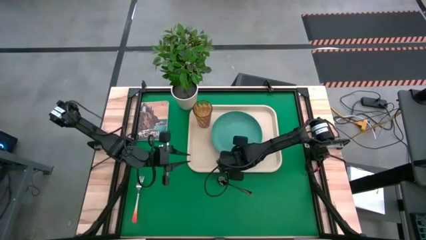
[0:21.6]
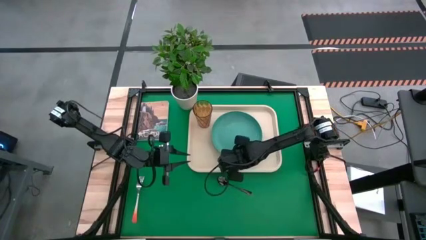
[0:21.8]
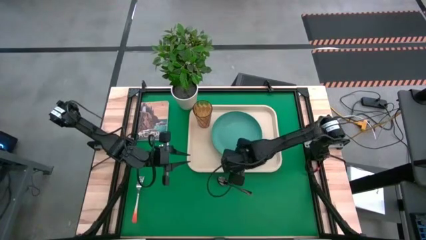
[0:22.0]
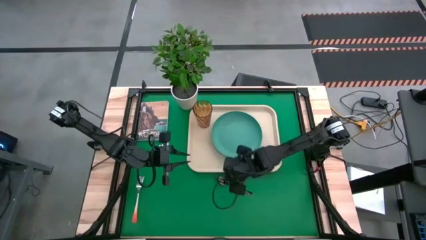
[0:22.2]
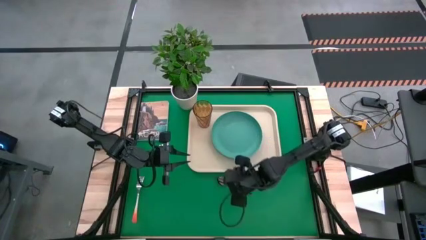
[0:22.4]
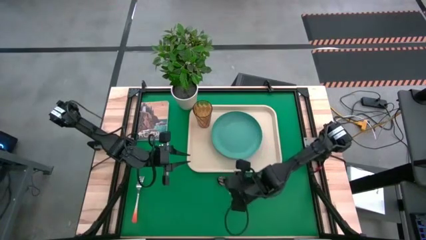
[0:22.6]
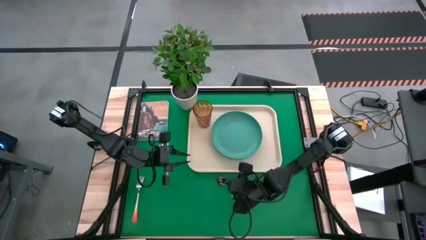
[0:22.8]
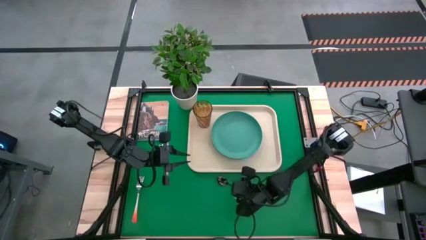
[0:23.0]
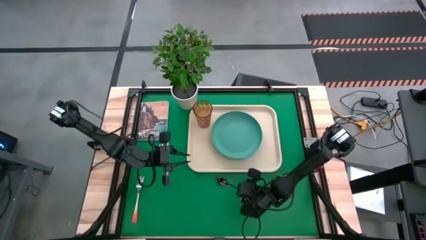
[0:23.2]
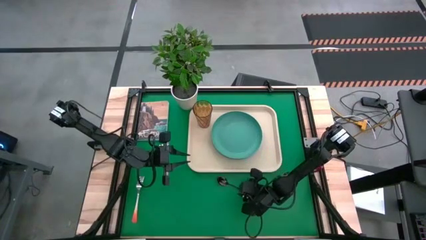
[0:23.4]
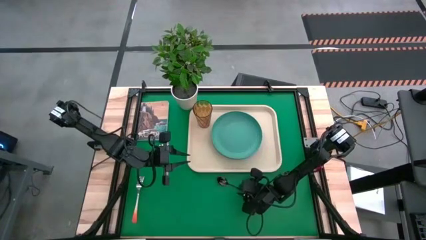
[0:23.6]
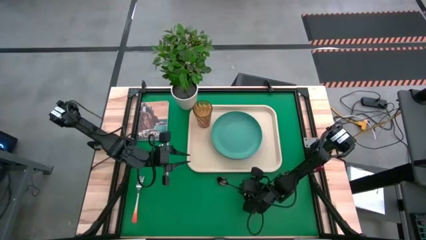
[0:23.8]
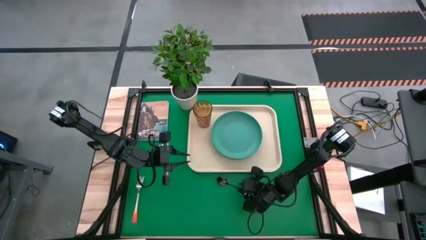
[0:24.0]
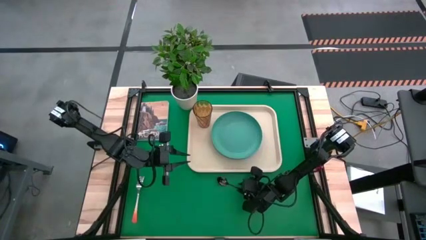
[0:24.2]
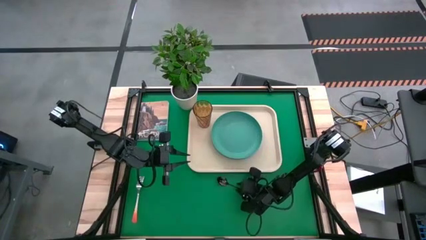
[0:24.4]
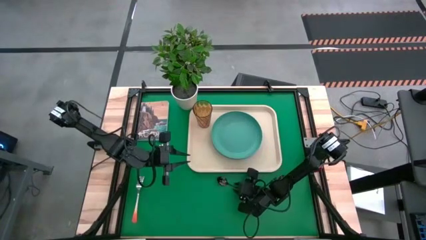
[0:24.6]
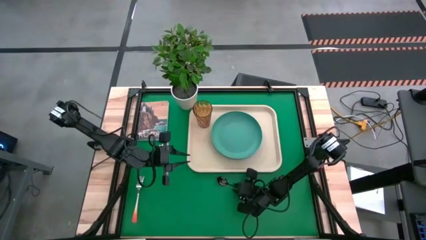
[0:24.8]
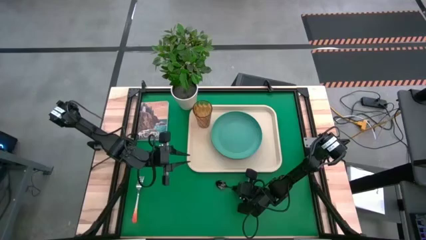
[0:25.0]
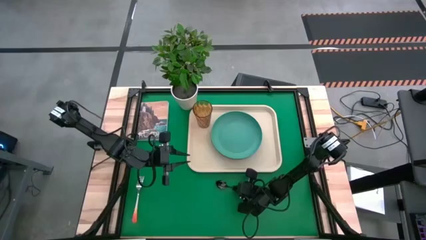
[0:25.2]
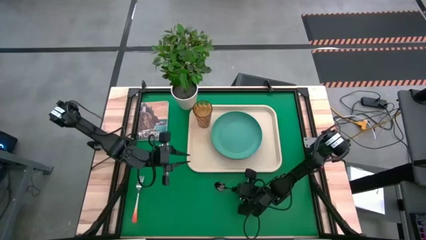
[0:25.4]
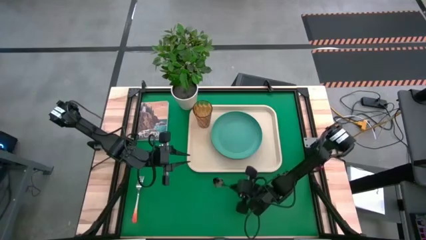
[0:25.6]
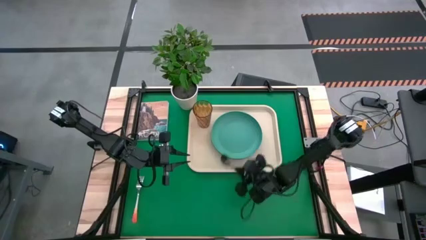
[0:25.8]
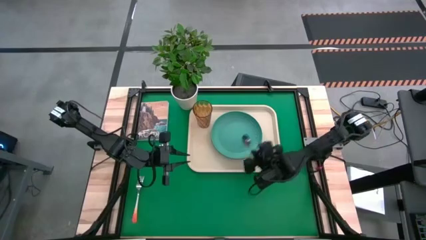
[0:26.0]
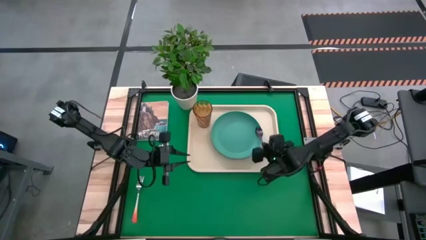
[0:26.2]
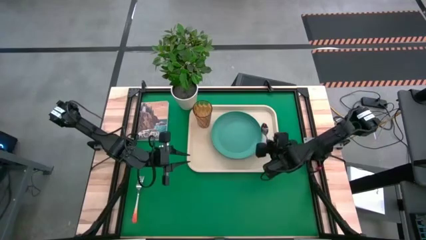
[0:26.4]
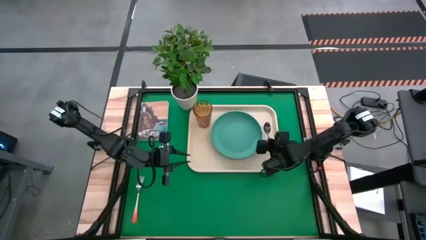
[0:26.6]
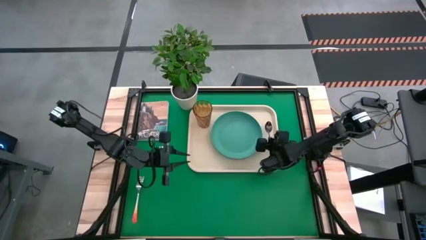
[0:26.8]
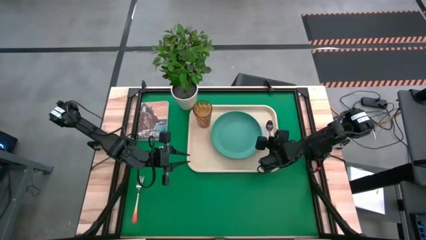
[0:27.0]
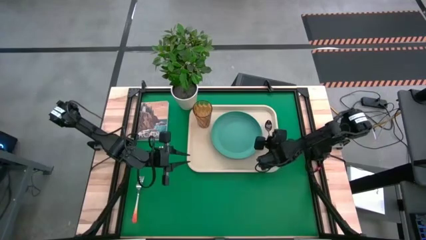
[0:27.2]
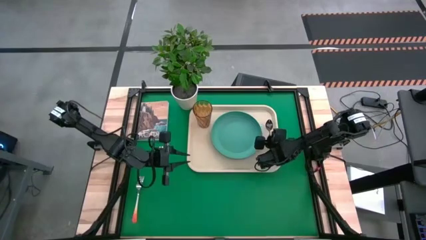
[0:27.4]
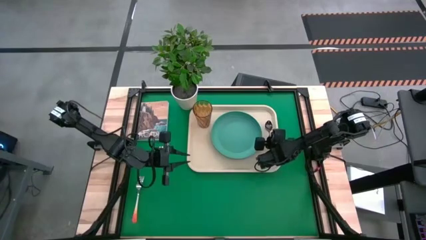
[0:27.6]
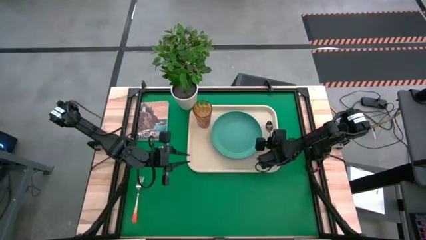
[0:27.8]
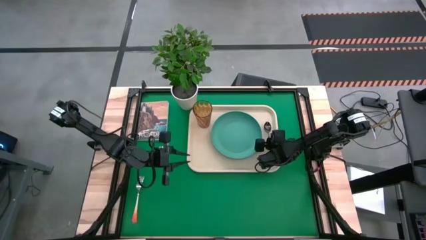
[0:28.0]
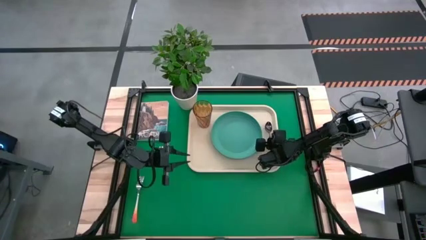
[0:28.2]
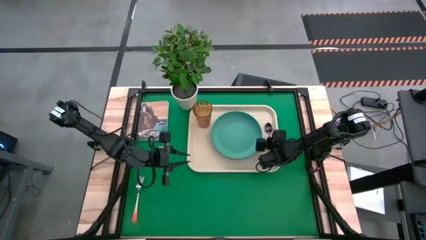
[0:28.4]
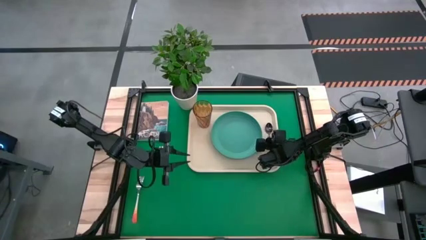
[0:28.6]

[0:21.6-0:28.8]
Task: Pick and place plate/cup/fork/spoon on tray
Put the black spoon on the white serving tray beside the blue plate

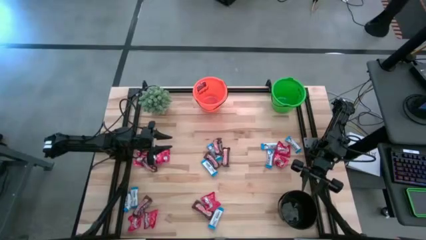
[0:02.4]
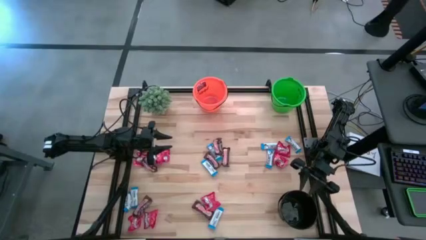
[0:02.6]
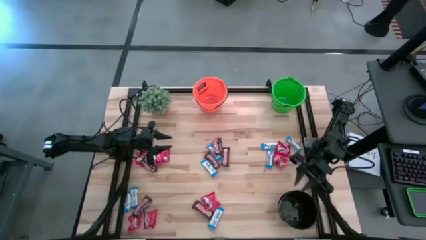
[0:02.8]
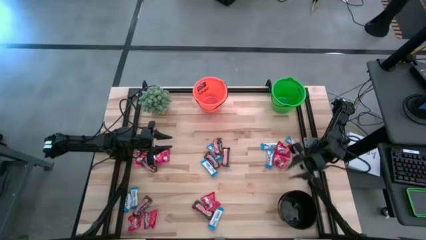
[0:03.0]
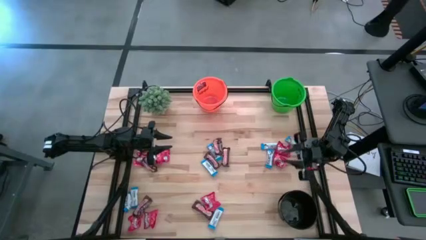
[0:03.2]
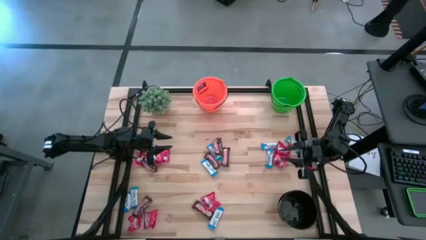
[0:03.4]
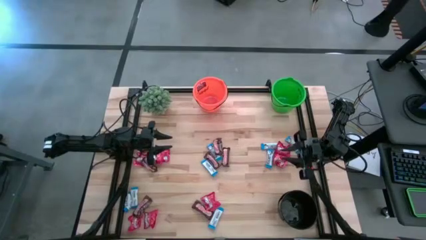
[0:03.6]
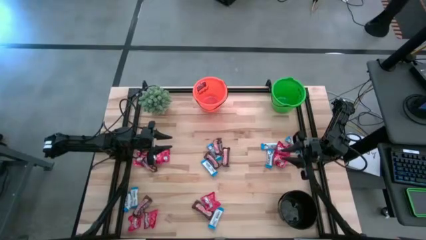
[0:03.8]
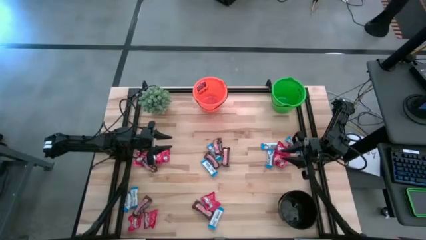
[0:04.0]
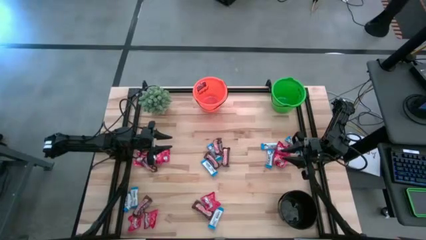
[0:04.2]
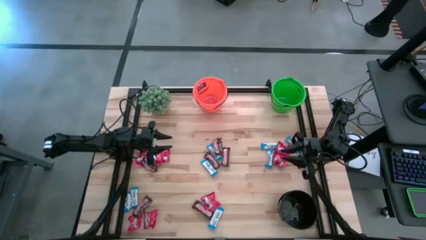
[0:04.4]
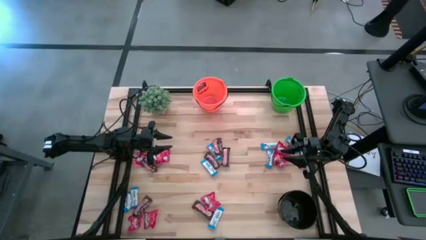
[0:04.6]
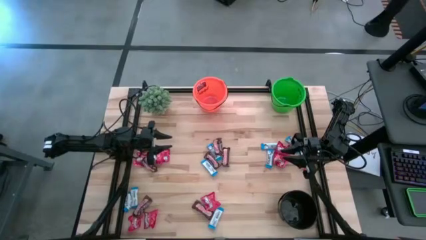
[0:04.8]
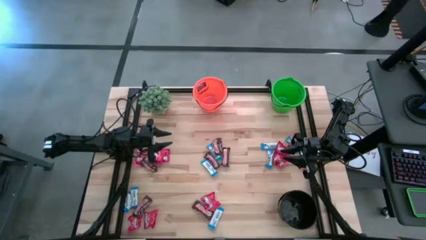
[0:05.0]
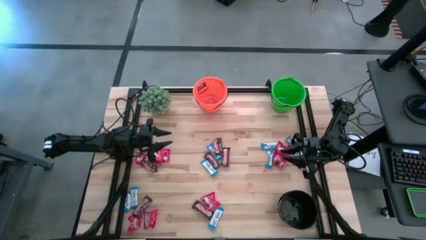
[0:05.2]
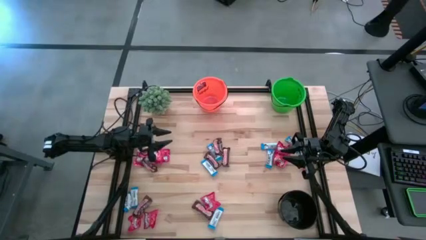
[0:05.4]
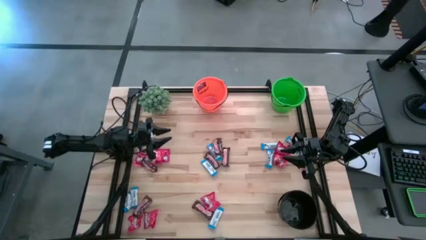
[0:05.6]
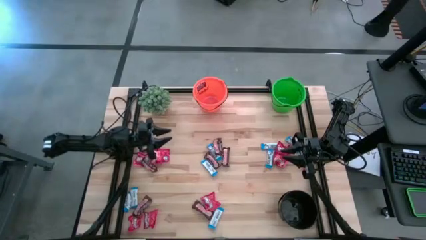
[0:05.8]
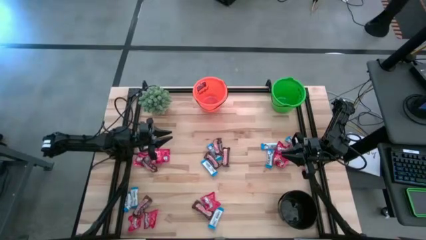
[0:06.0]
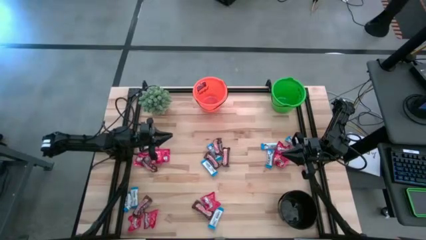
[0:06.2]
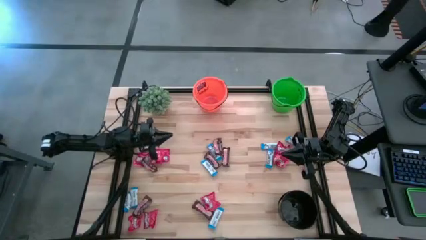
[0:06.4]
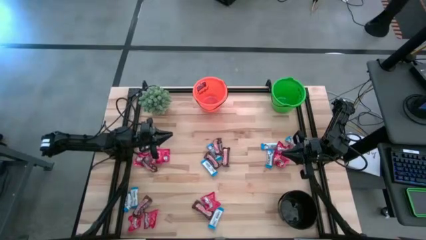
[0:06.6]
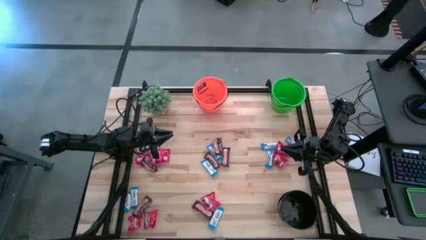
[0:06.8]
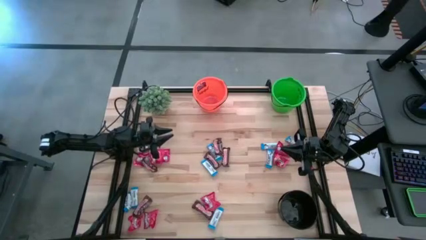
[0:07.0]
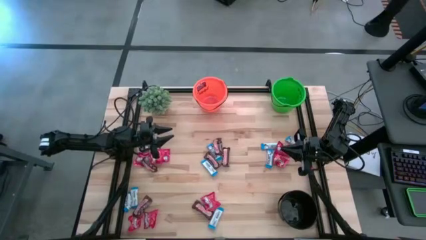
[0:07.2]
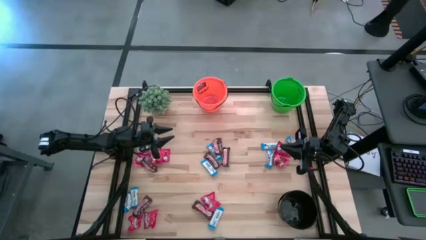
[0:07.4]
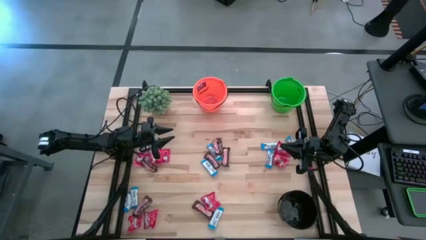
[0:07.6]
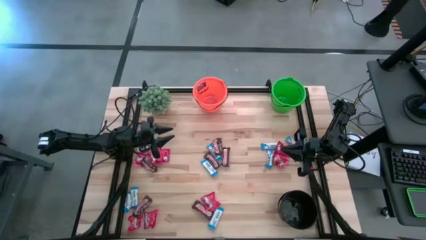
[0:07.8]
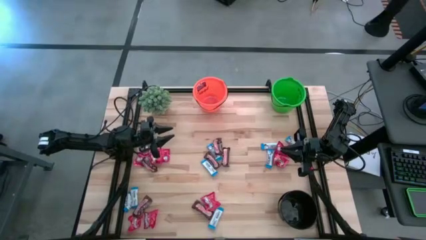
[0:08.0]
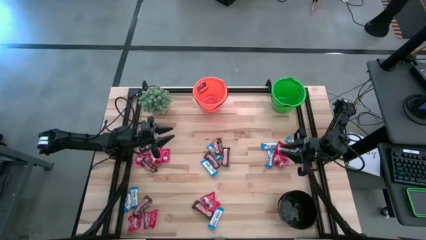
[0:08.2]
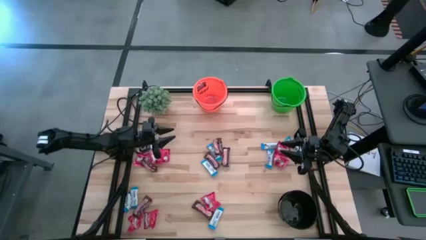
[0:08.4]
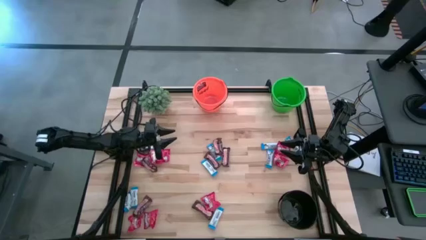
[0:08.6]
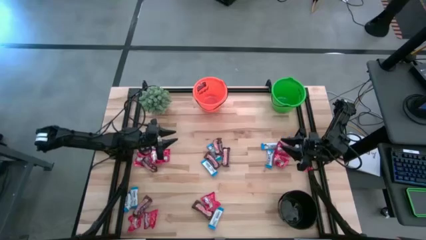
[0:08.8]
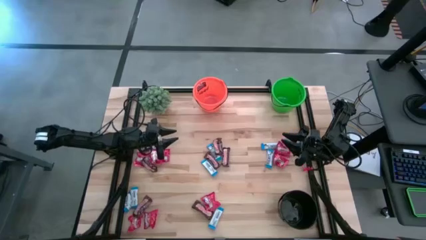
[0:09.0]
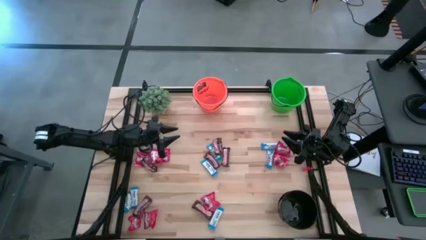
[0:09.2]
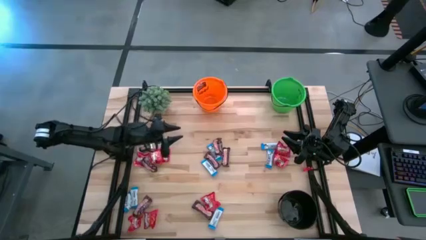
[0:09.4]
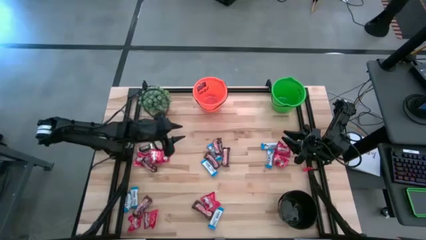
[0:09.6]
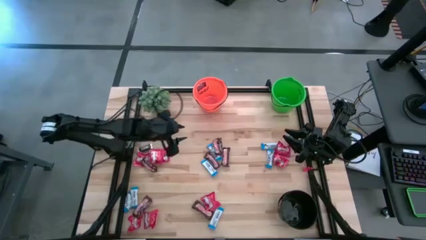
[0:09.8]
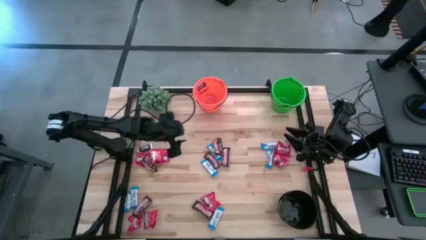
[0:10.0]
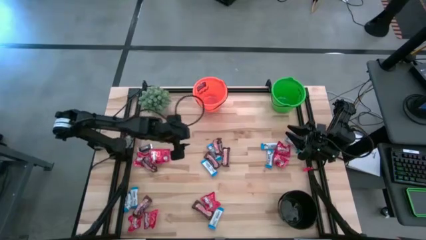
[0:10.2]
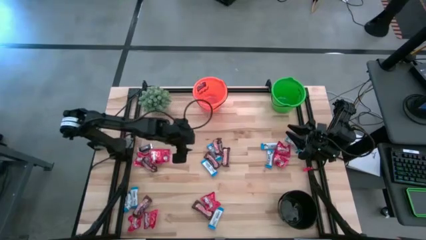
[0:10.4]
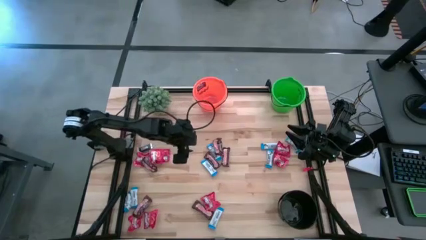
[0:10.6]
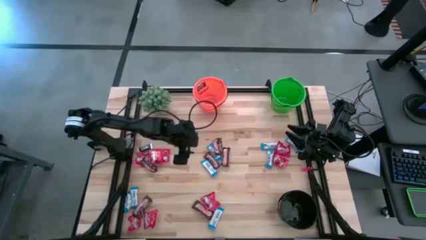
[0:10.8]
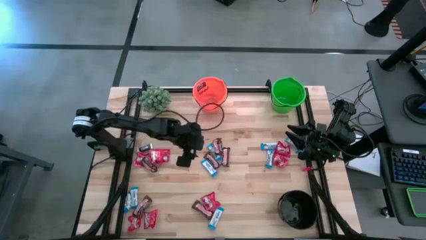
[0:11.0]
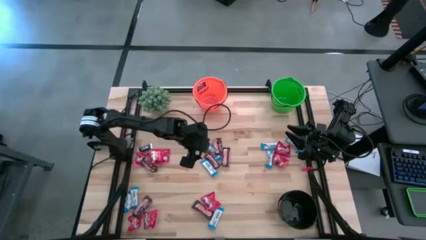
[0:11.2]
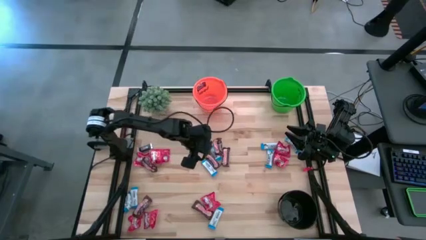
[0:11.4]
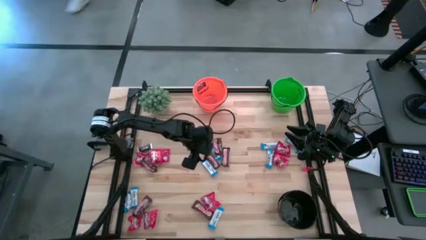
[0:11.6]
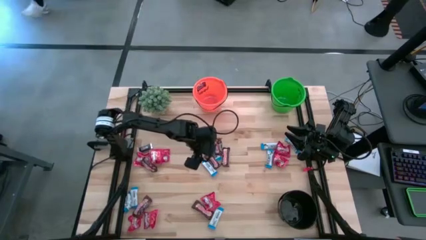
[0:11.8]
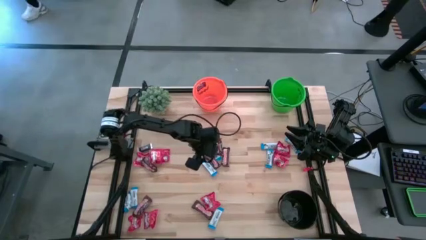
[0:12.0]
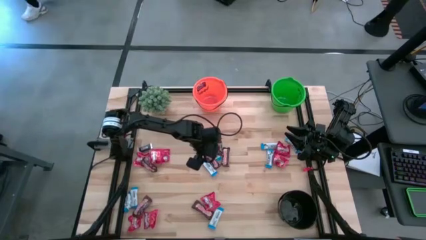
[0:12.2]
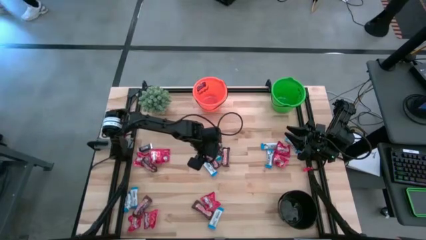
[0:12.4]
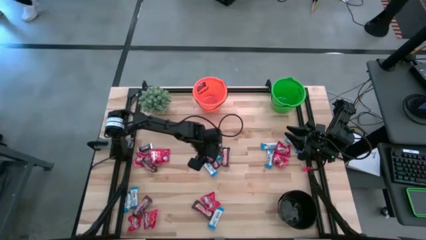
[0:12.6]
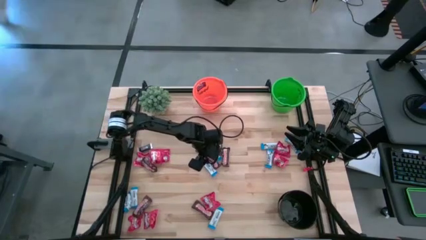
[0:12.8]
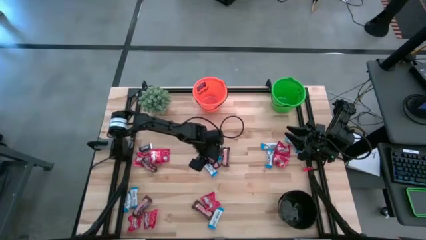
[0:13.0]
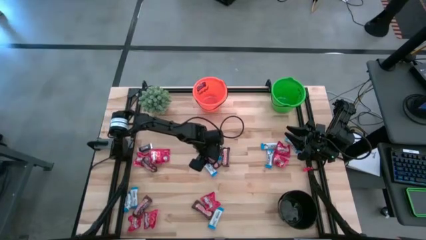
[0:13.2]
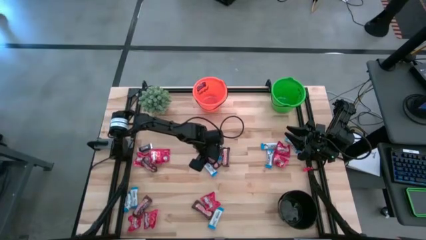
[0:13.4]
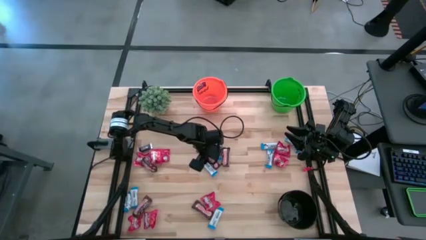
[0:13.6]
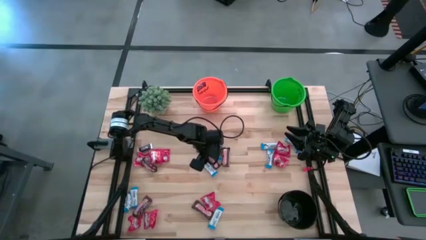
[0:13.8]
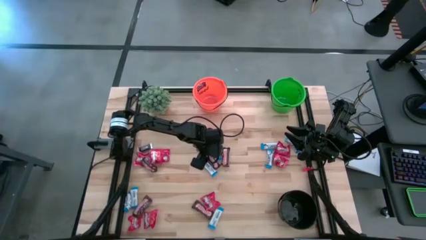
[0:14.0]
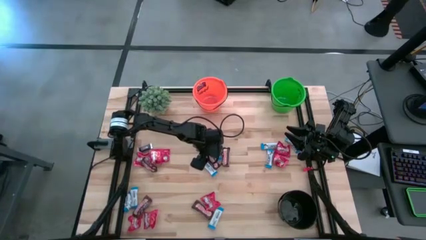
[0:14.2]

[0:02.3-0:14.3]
Task: Organize candy in baskets
Put the brown chocolate bar into the black bucket
